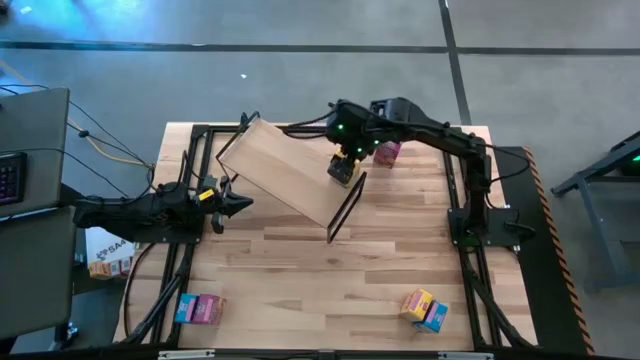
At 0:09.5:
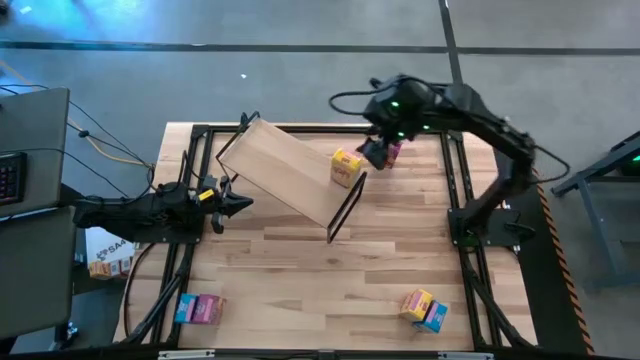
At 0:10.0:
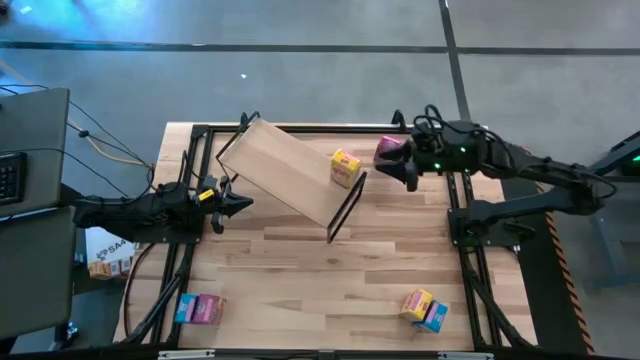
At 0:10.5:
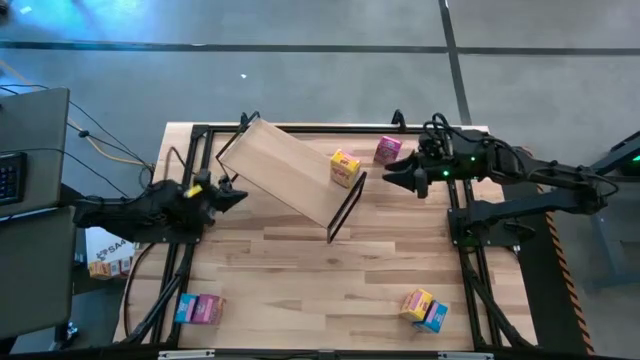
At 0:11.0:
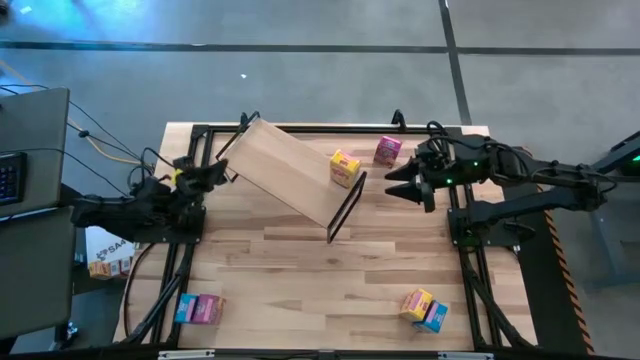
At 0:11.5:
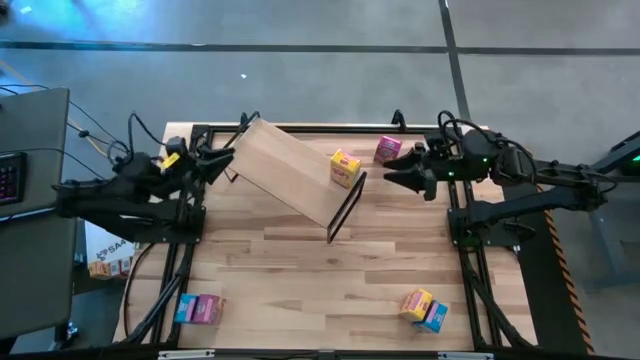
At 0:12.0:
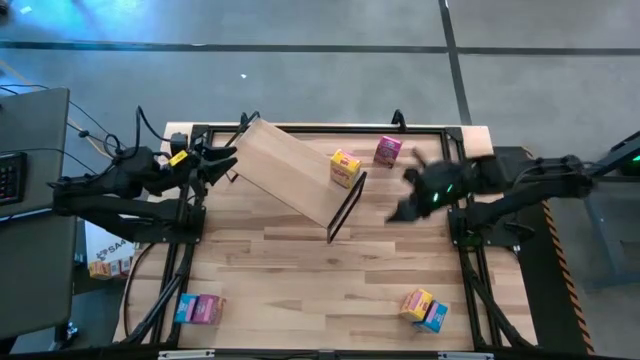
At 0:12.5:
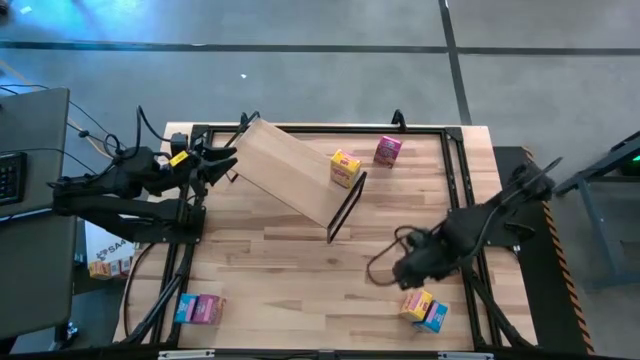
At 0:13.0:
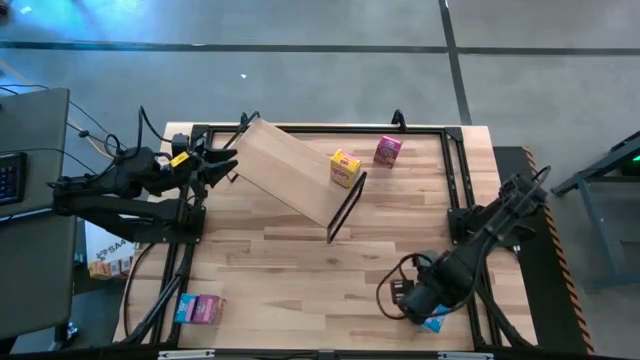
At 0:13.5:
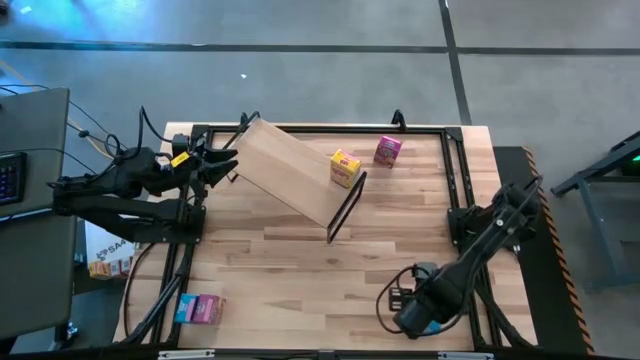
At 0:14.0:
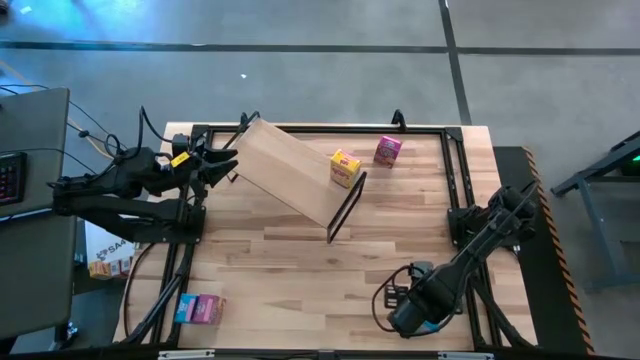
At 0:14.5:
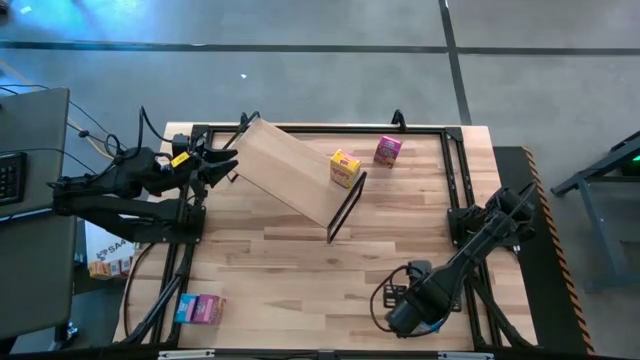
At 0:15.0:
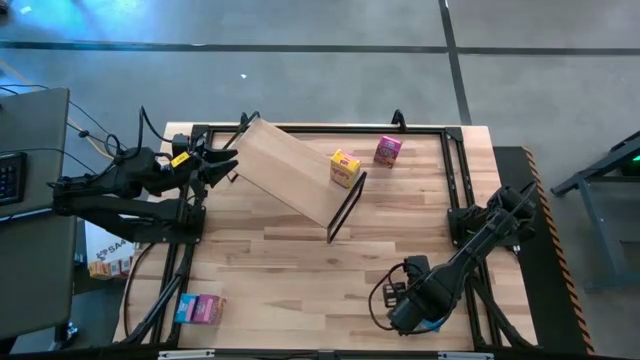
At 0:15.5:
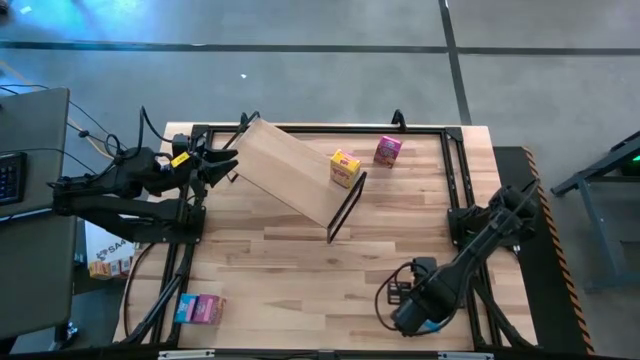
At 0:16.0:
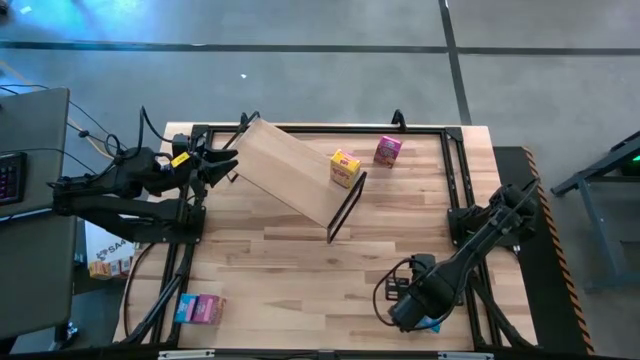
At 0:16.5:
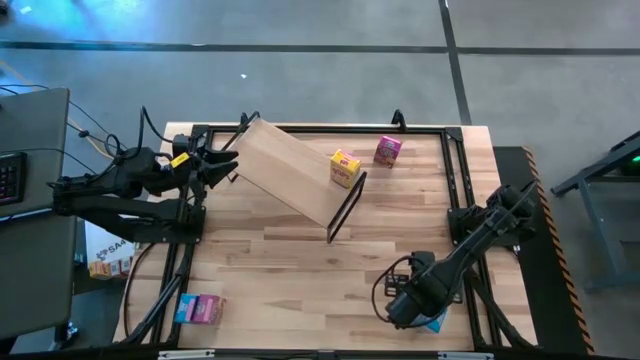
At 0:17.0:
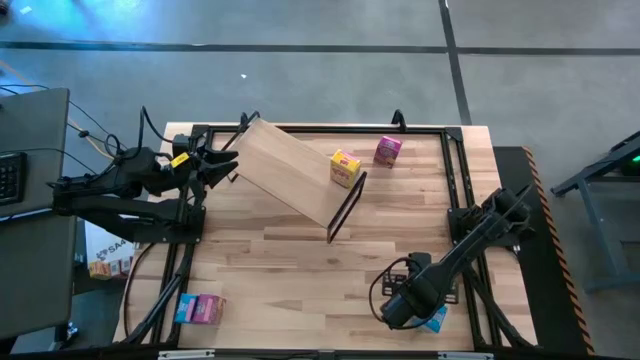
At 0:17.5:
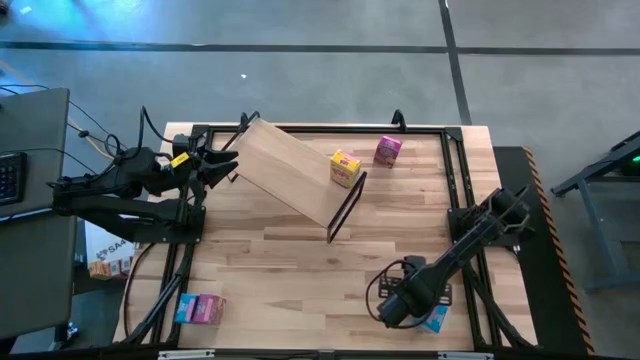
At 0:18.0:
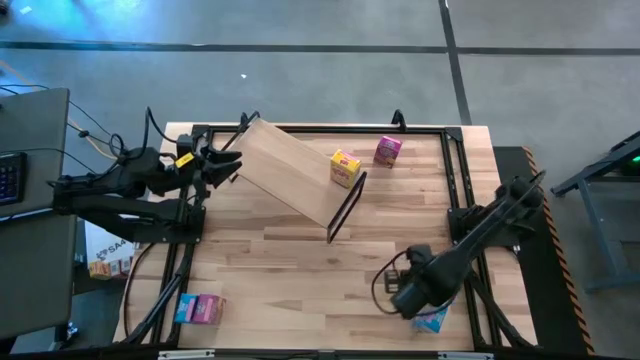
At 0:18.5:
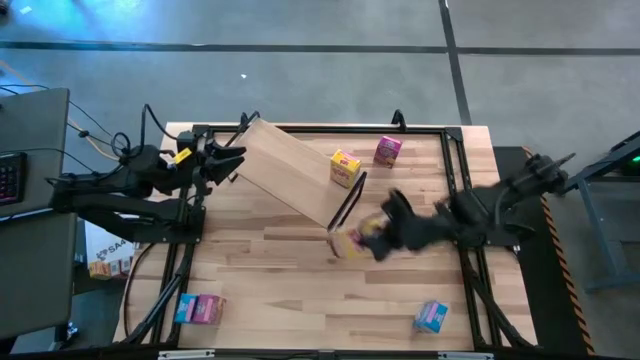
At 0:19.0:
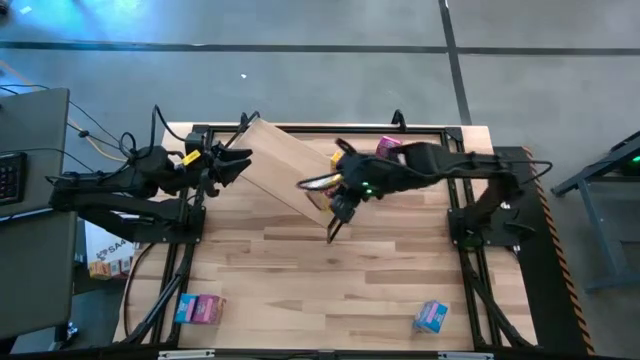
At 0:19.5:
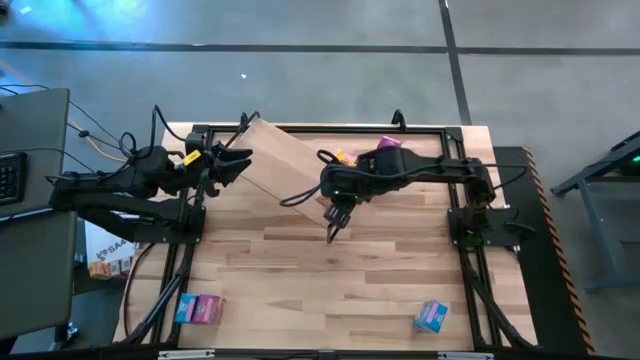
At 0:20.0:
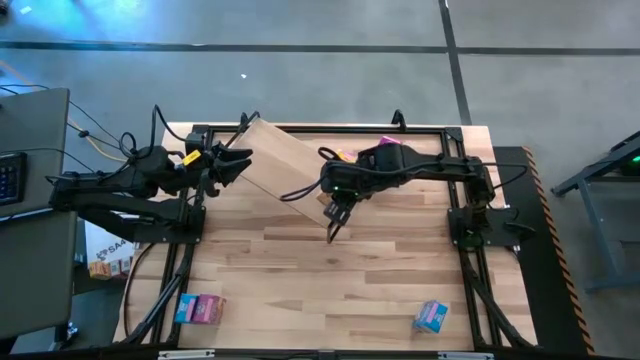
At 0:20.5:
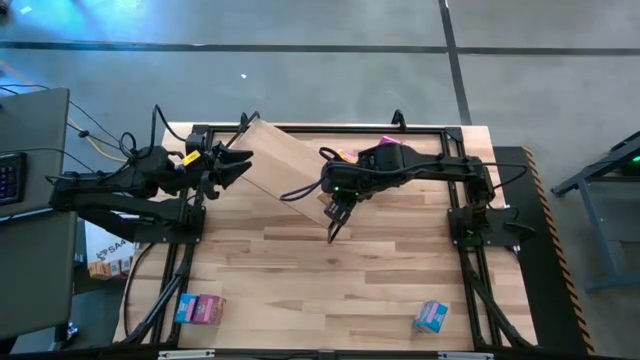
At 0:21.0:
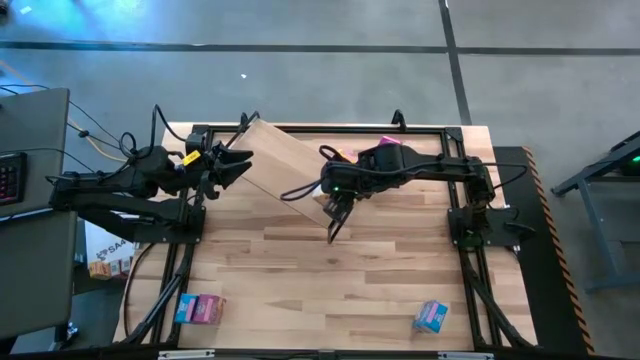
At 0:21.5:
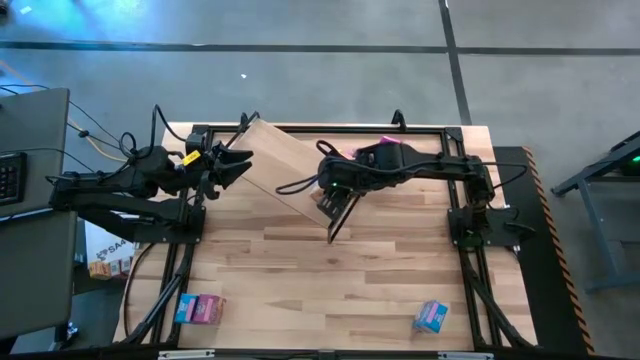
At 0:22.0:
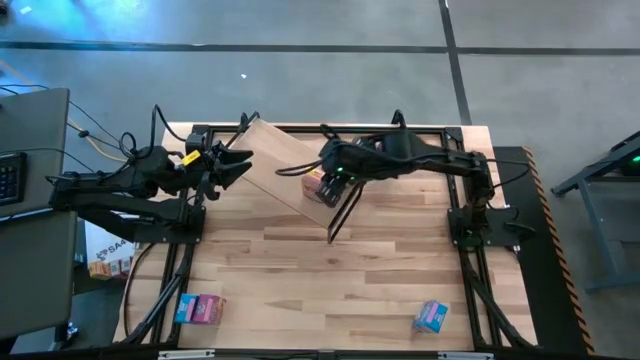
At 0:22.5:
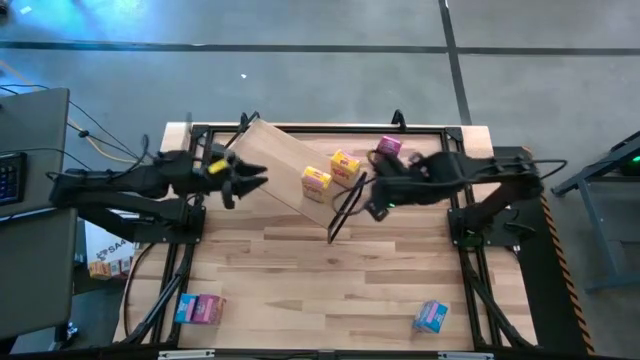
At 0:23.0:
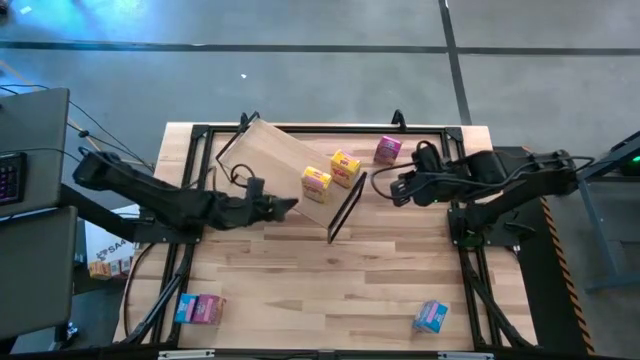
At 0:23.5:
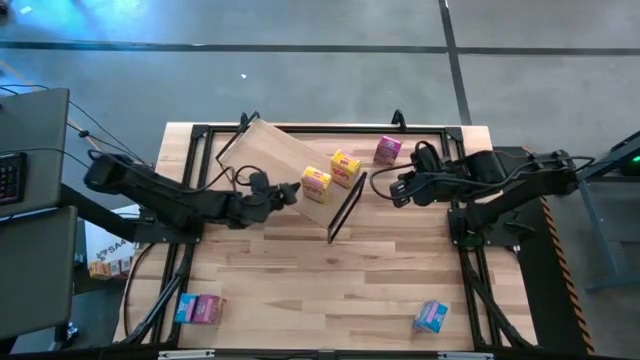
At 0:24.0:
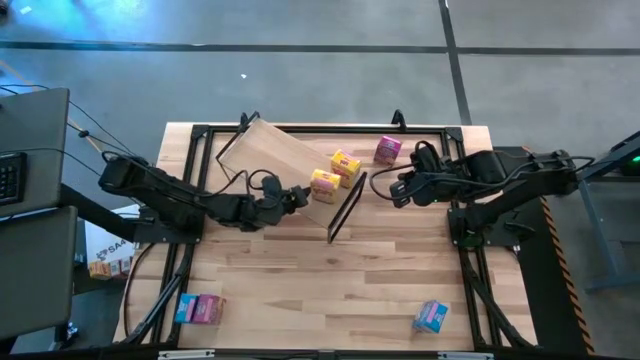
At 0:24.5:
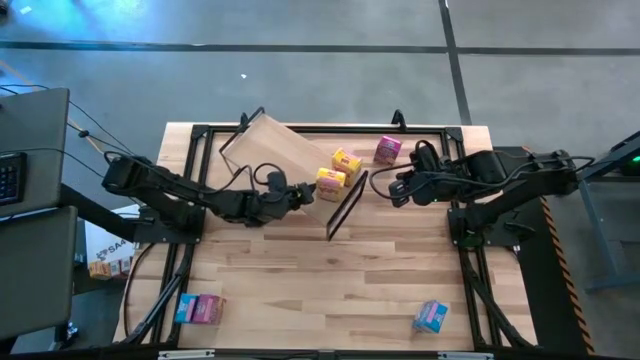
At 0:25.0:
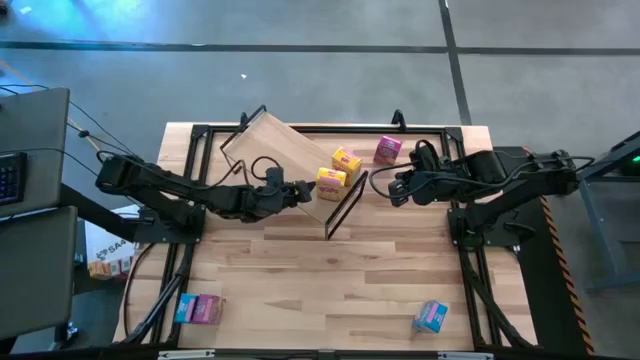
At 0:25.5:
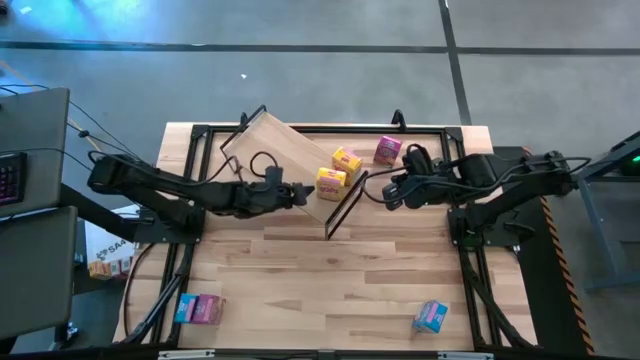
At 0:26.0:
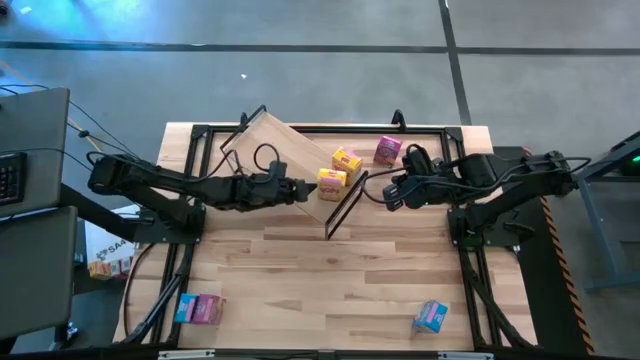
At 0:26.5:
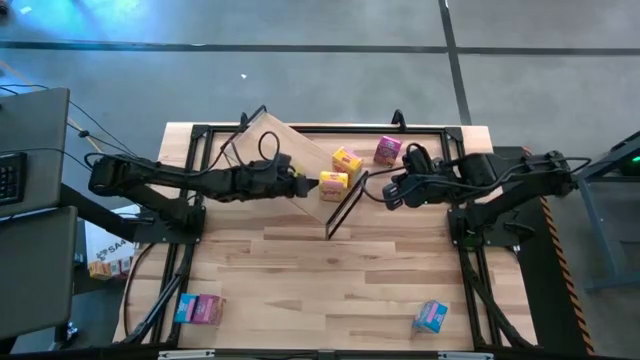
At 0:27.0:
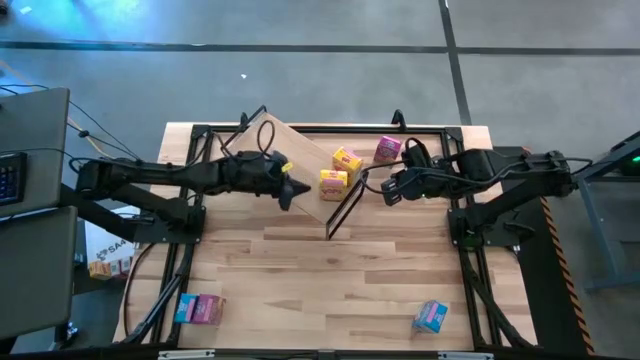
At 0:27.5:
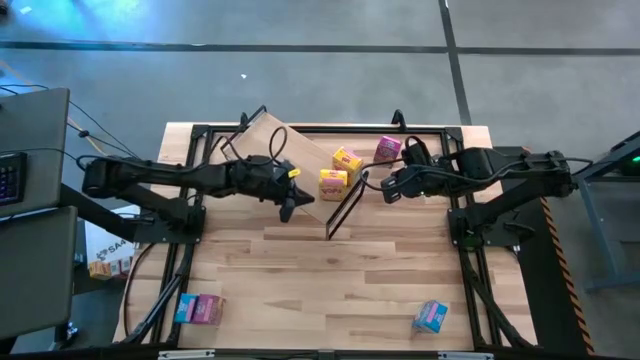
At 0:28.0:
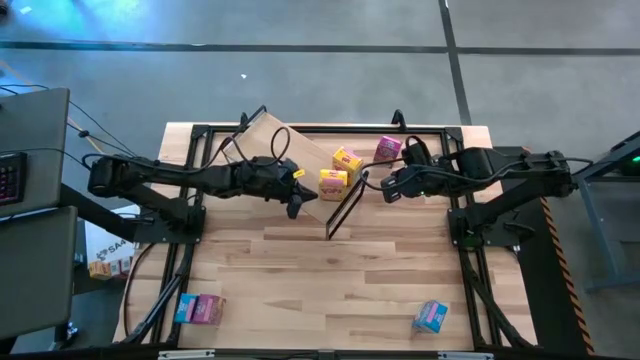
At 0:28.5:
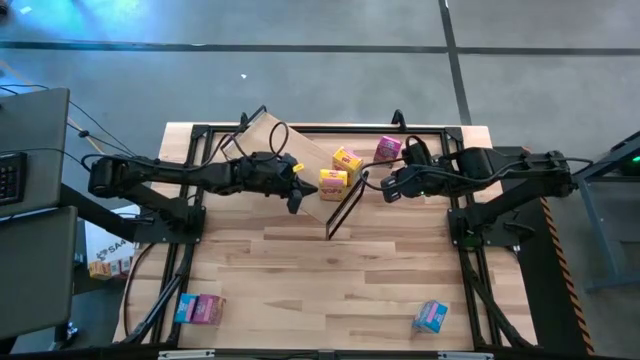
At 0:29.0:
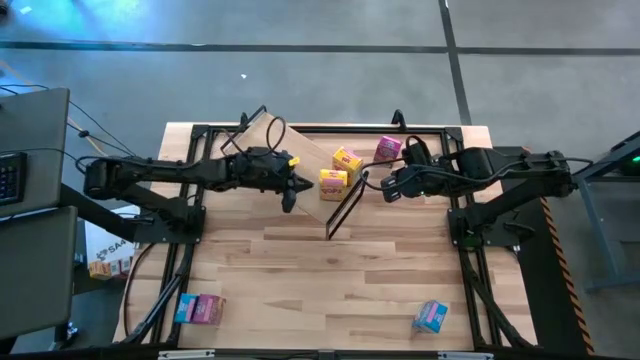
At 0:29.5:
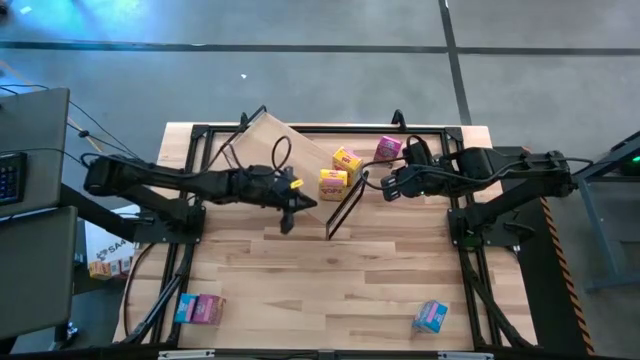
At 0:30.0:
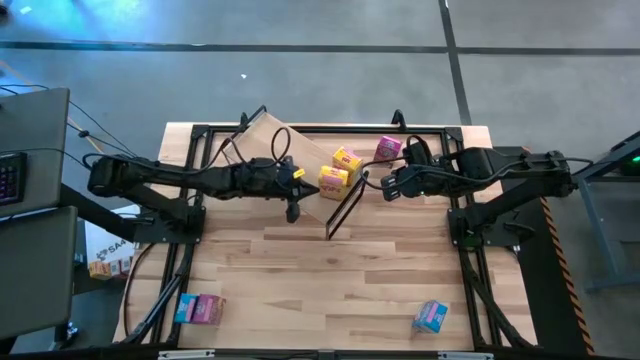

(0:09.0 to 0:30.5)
Task: Stack cereal on shelf
Put the yellow cereal box on the shelf aligned with the other yellow cereal box
